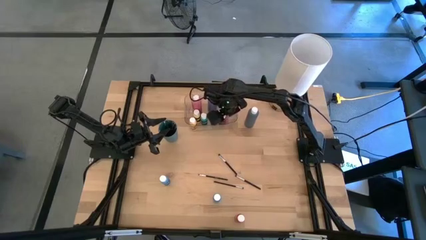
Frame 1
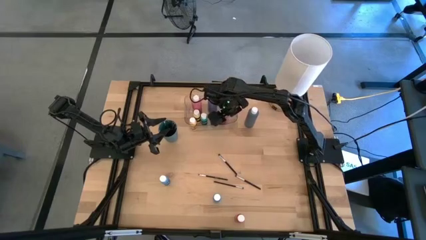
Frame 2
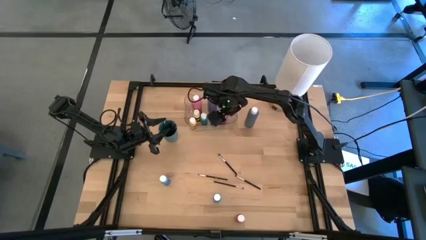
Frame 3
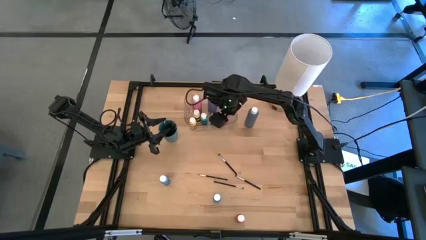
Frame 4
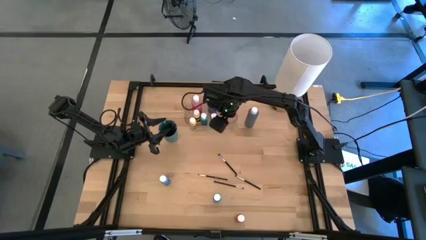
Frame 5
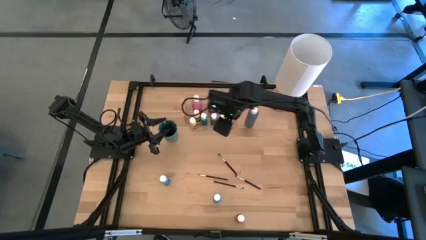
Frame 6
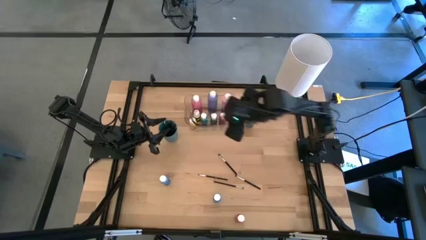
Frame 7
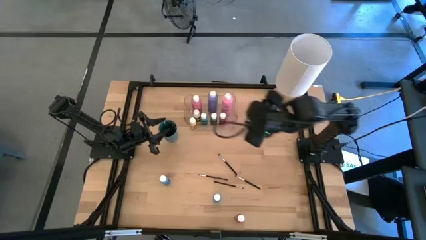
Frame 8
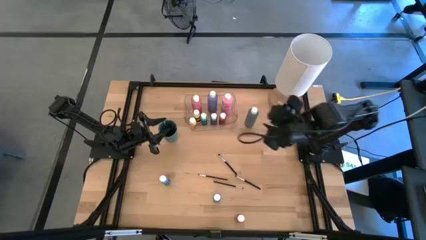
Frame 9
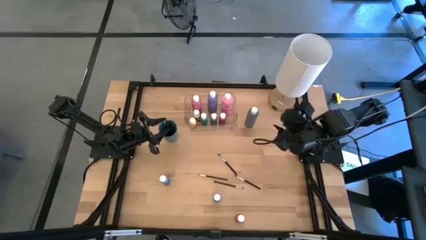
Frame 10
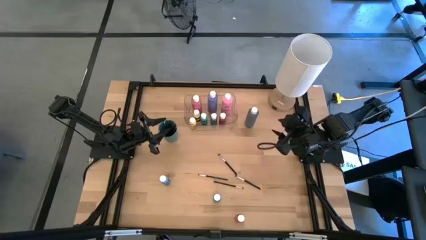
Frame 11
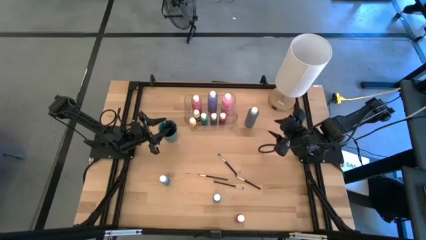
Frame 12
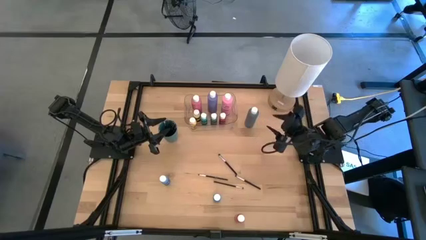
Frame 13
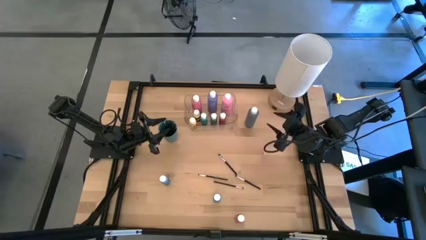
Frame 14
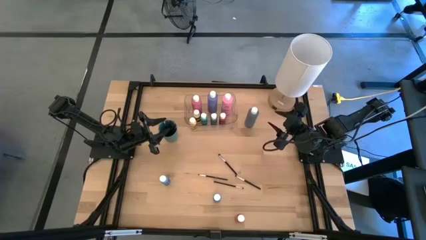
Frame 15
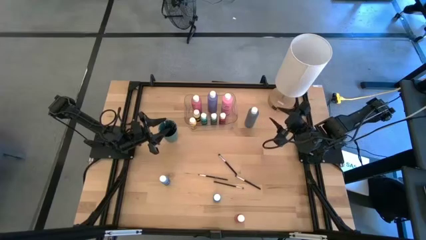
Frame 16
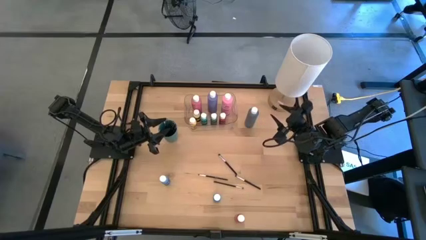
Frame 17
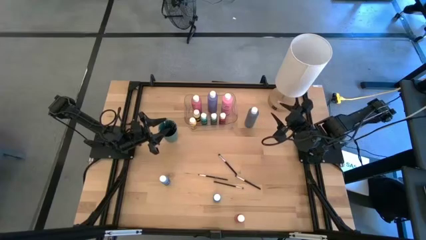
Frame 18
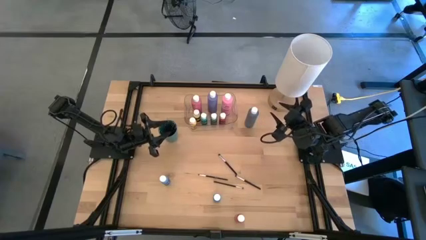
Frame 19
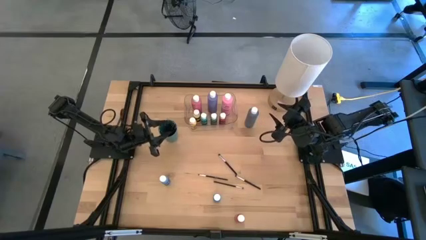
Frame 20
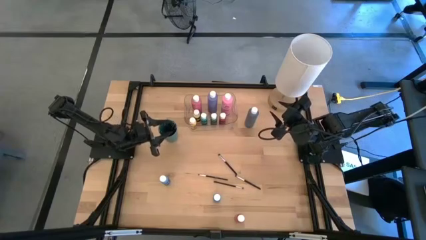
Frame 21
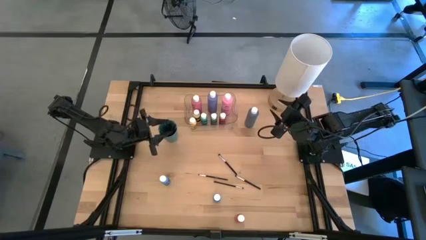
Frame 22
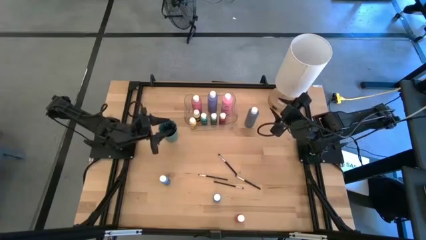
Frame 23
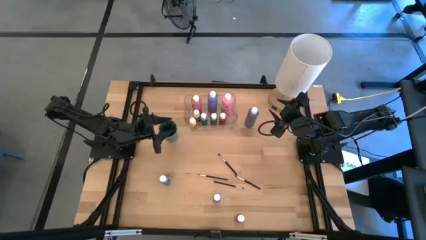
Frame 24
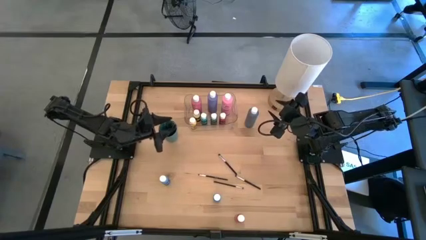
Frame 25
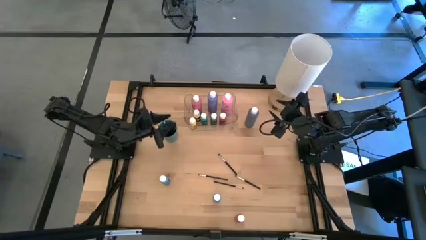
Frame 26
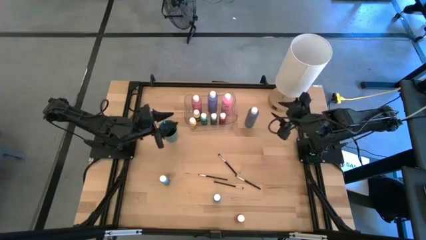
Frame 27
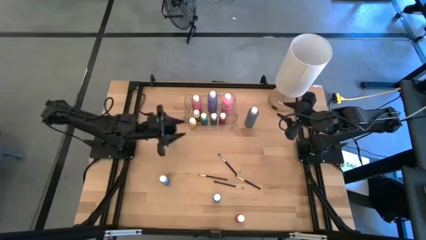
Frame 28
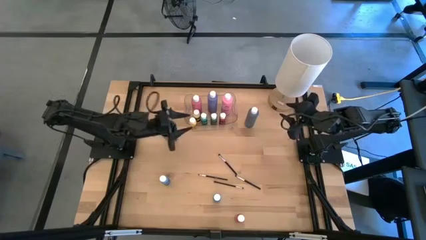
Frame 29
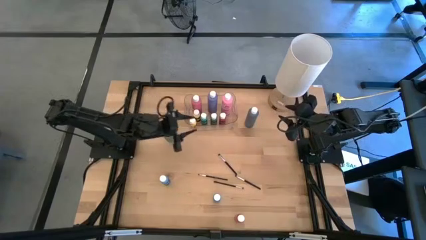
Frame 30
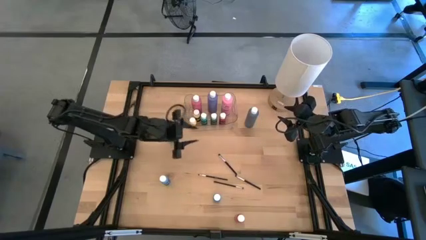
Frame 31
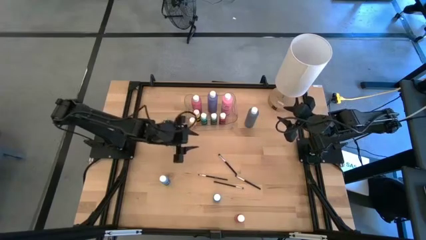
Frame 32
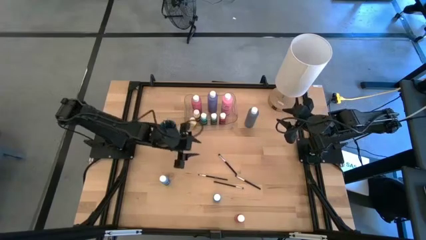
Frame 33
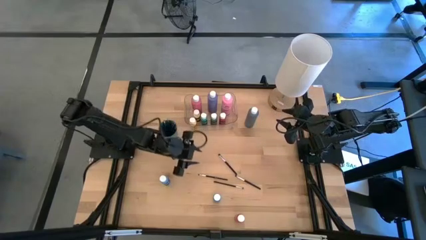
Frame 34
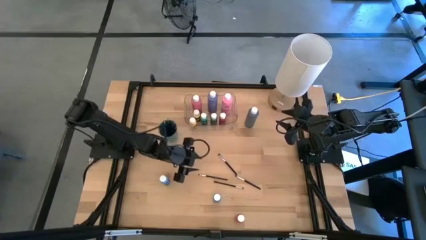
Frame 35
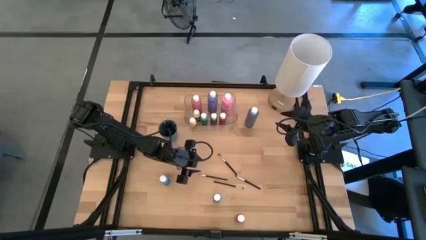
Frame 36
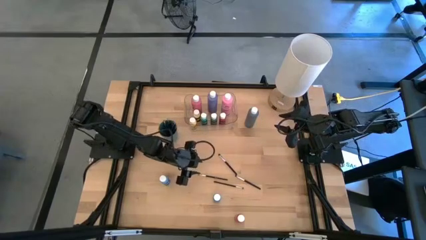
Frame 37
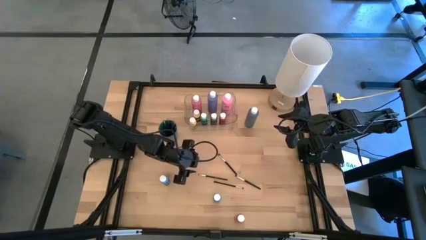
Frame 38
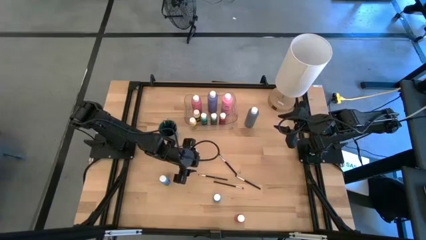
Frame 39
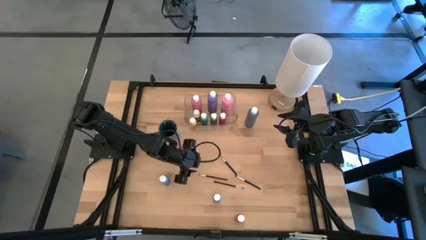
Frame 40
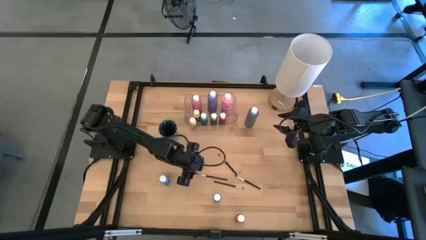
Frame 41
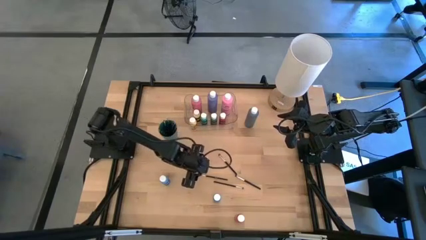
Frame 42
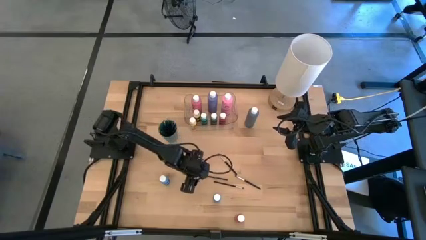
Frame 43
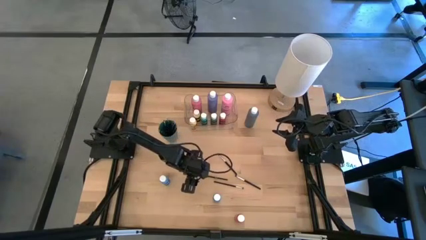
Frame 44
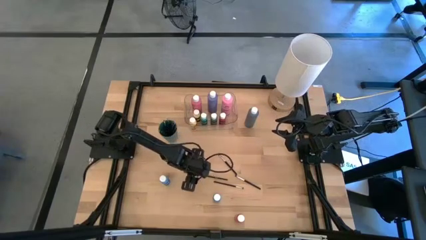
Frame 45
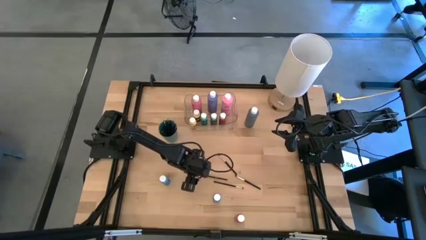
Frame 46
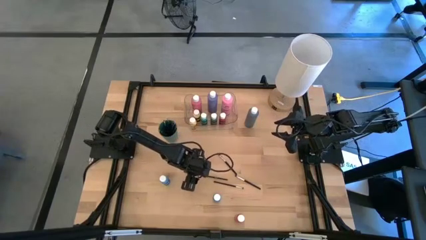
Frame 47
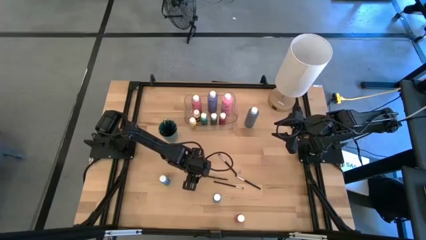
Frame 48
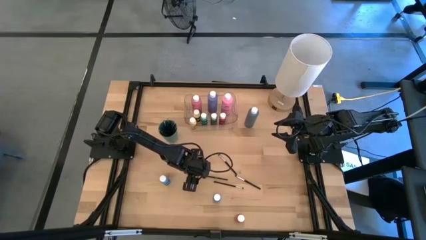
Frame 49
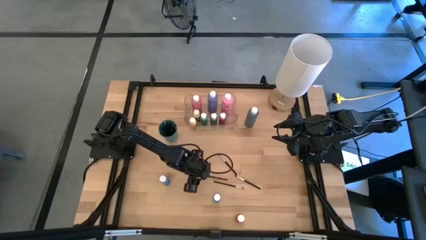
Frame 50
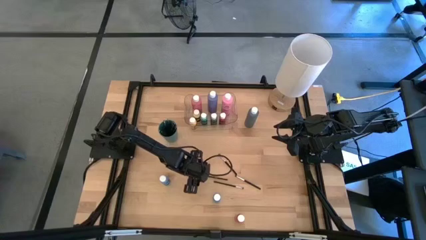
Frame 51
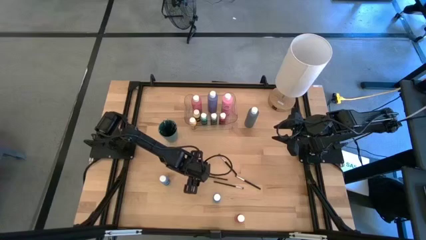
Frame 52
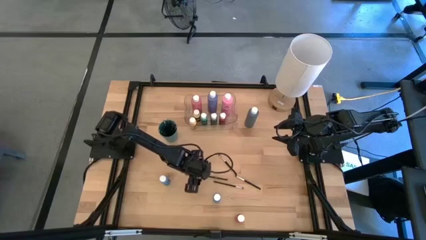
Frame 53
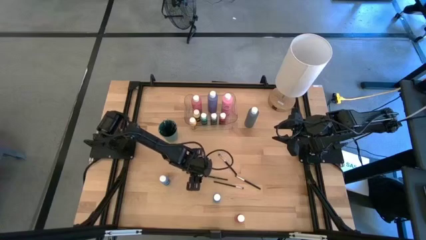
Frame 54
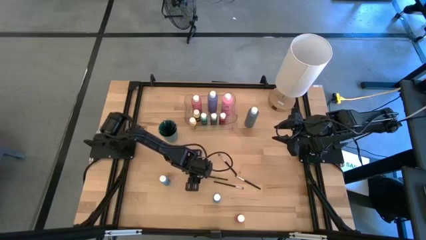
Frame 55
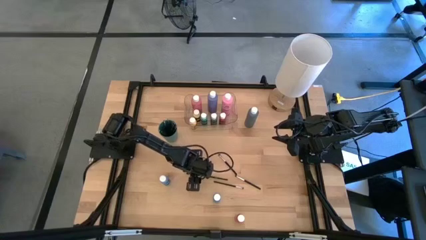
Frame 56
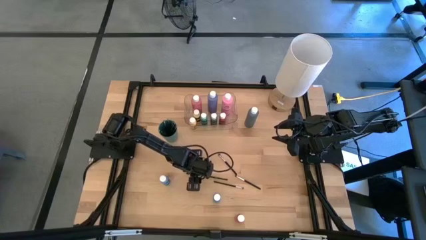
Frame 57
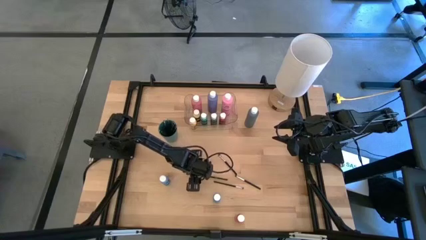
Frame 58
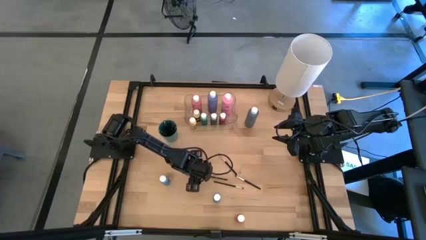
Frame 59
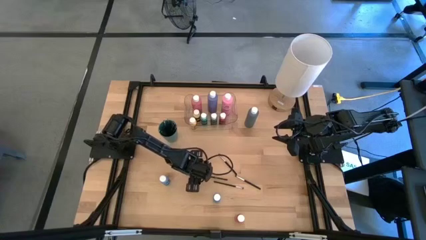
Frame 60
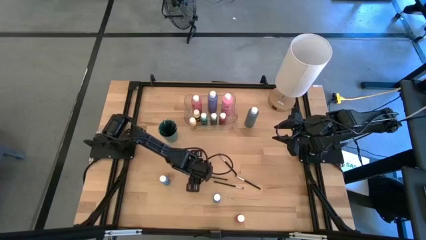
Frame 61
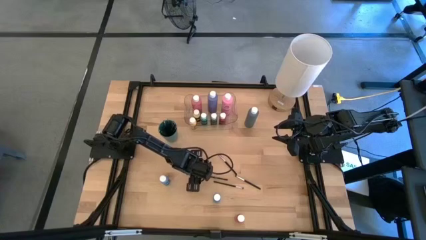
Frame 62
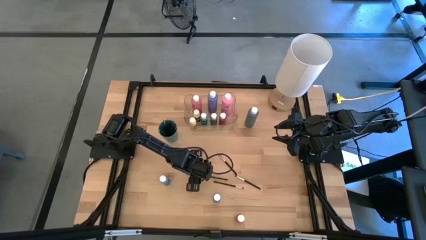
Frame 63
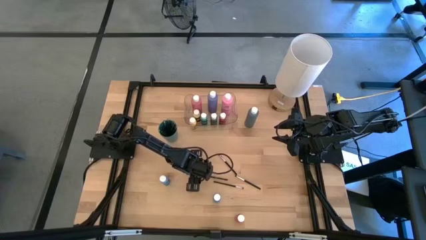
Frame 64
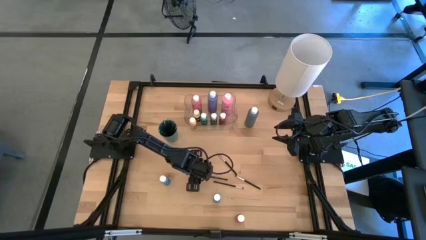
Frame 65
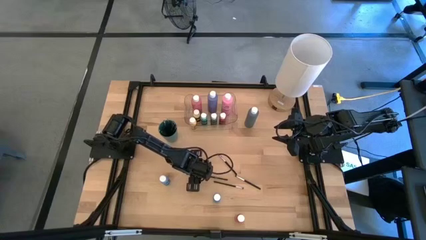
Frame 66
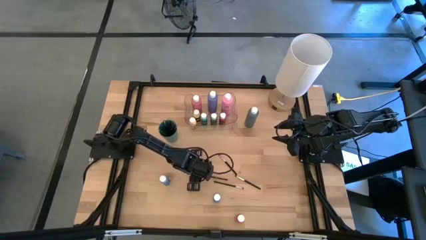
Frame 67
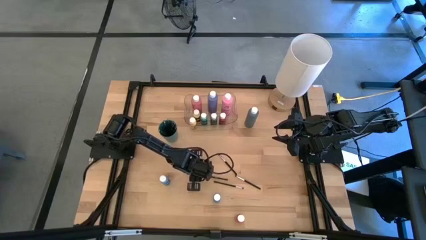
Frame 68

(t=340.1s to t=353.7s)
Task: Pick & Place Paint Supplies
Put the black paint brush into the green cup

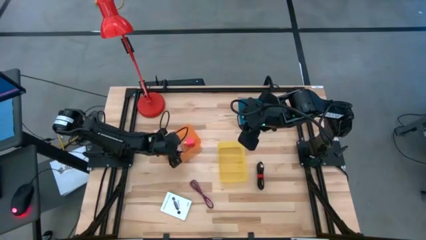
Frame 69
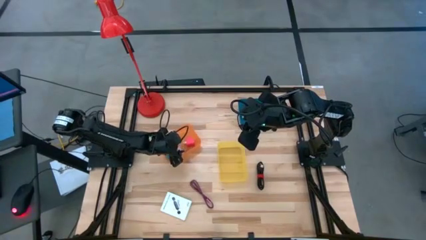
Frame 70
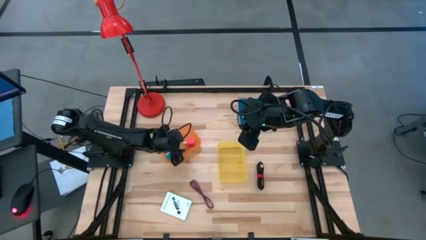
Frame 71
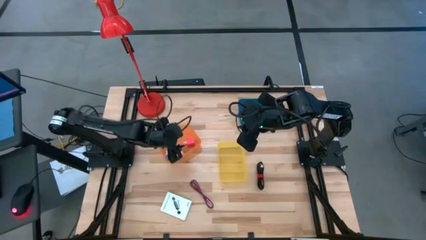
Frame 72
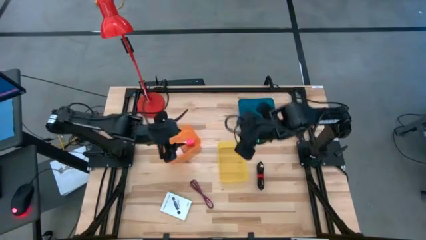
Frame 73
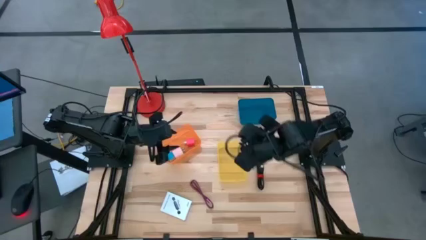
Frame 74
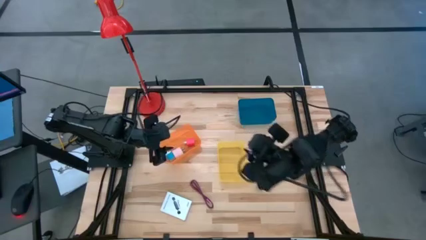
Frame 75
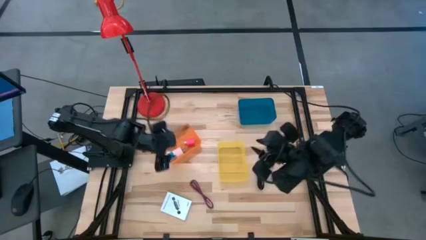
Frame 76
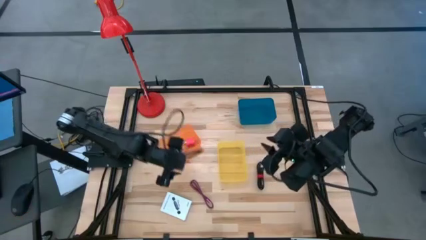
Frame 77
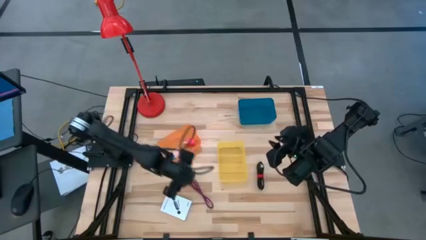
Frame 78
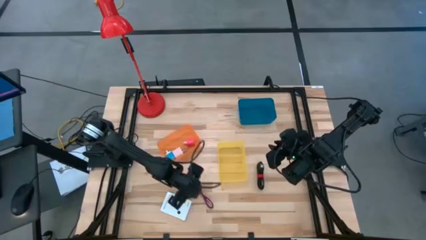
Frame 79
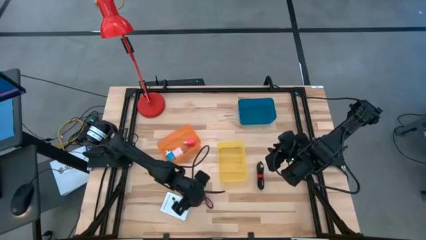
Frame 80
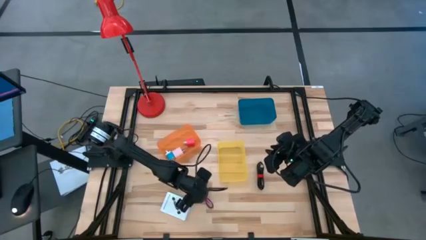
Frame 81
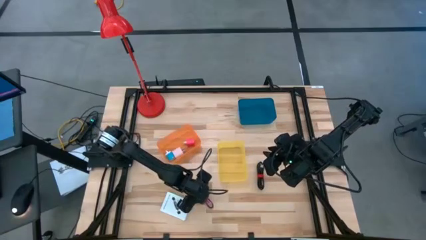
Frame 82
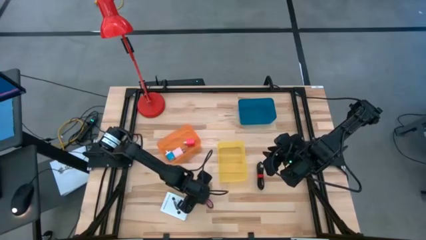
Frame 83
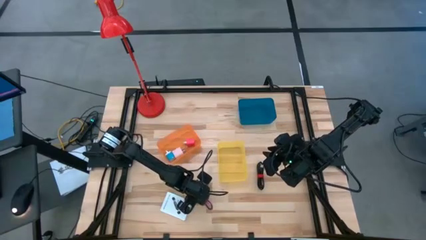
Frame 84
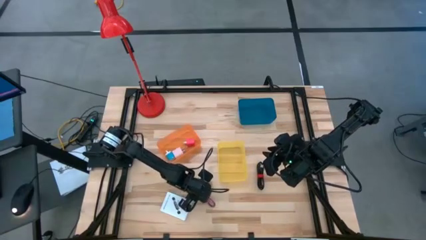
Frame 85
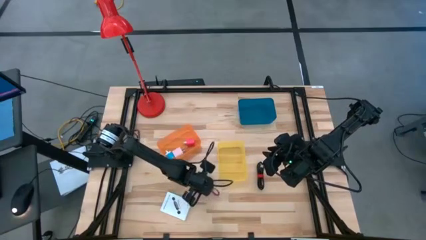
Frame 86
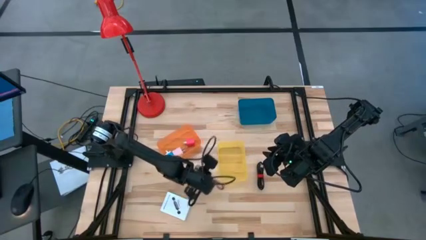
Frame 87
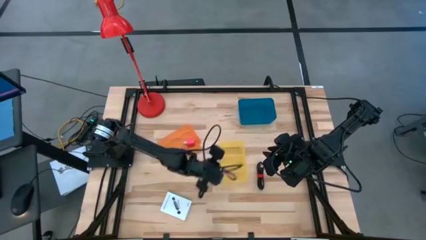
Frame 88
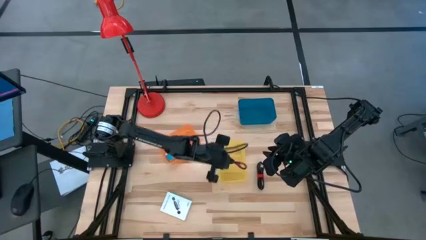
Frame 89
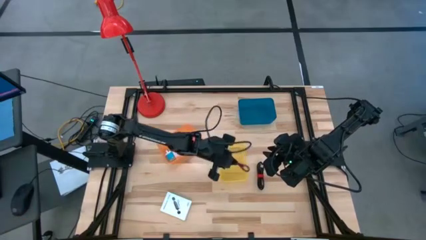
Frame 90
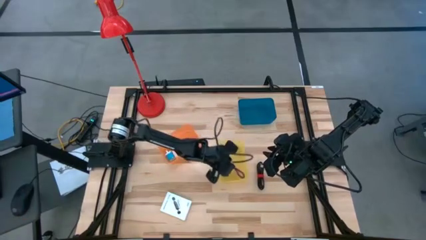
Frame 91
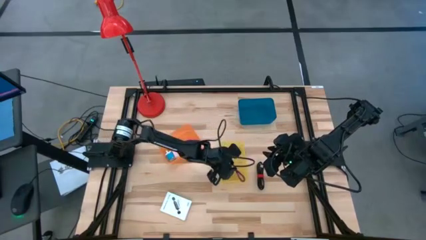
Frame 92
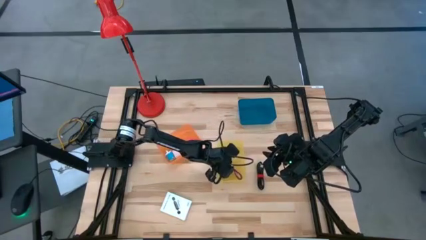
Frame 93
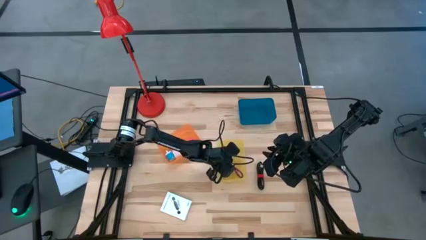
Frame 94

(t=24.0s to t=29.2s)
Task: Pick and place items into bin
Put the pink charger cable into the yellow bin
